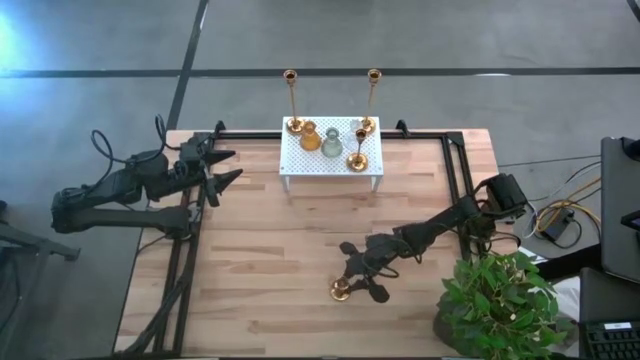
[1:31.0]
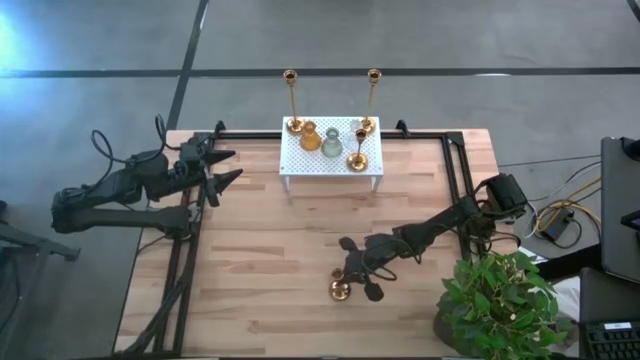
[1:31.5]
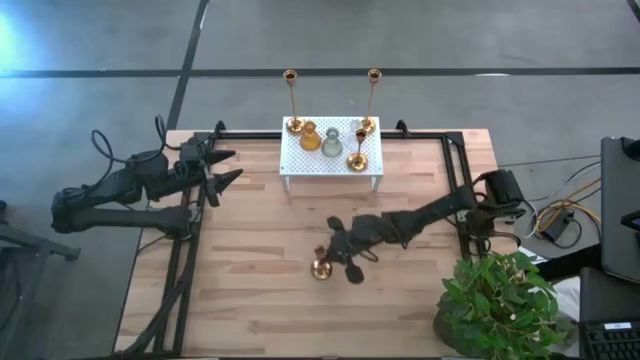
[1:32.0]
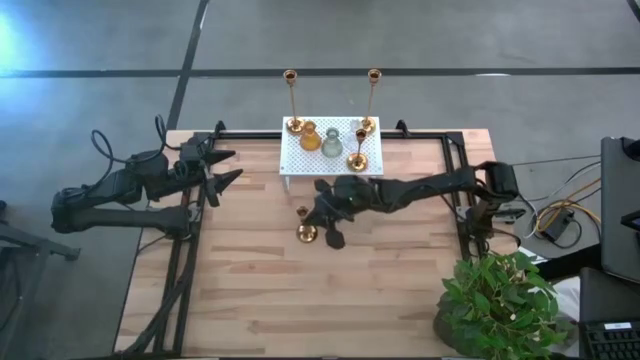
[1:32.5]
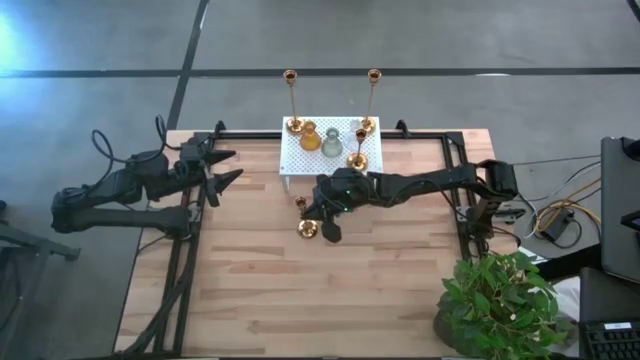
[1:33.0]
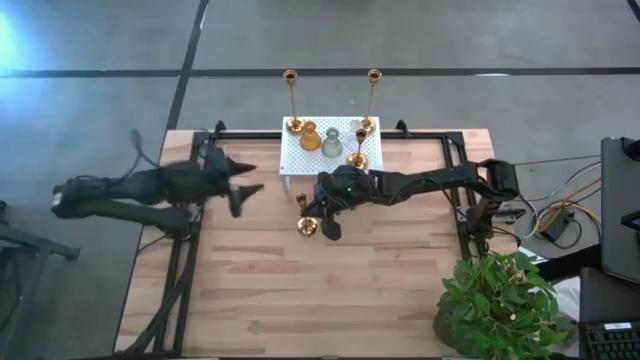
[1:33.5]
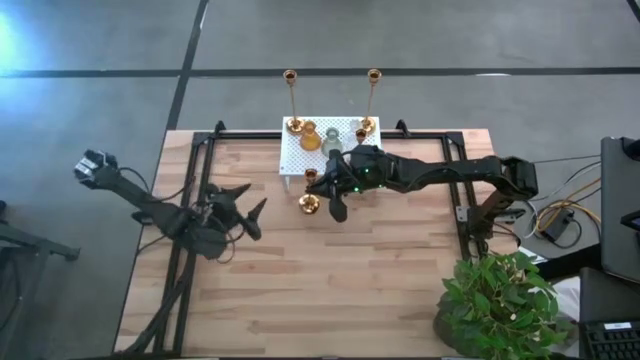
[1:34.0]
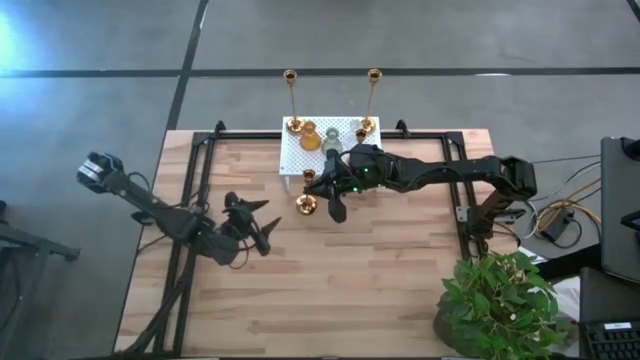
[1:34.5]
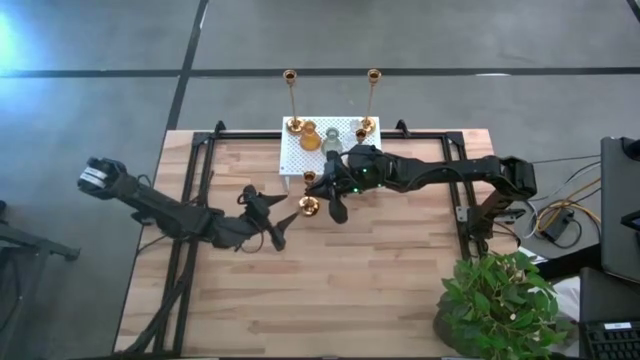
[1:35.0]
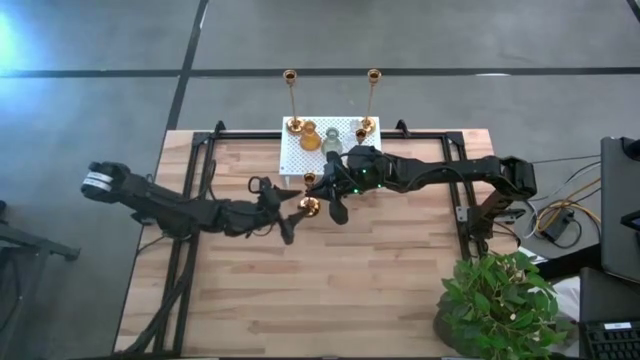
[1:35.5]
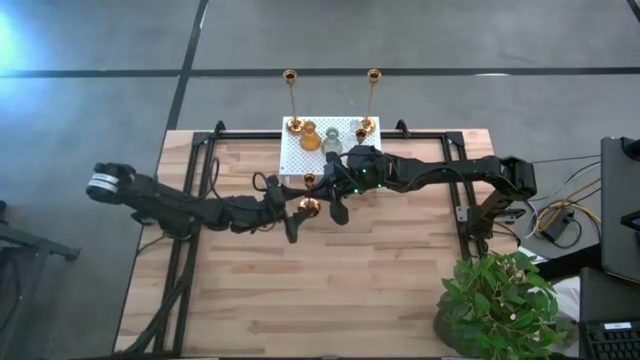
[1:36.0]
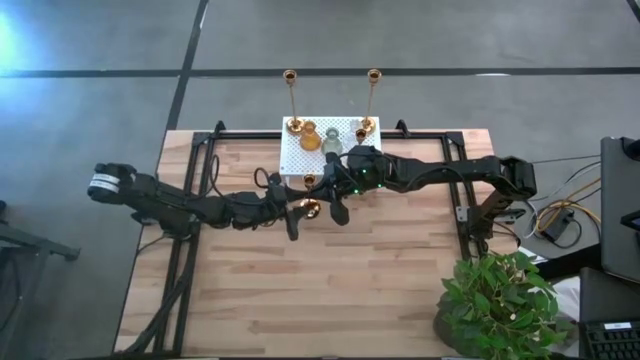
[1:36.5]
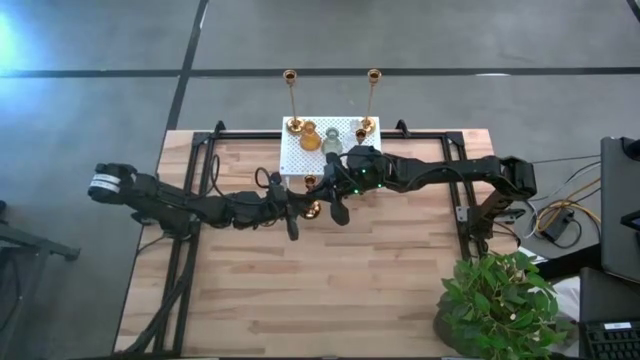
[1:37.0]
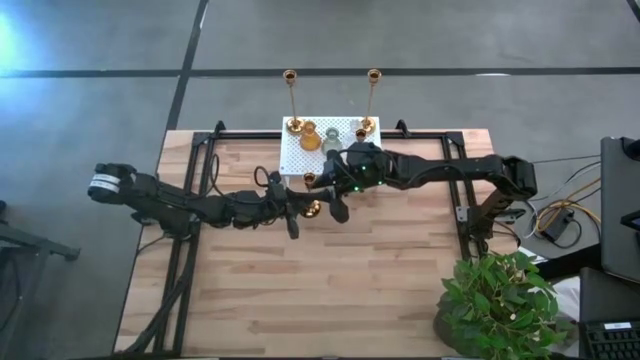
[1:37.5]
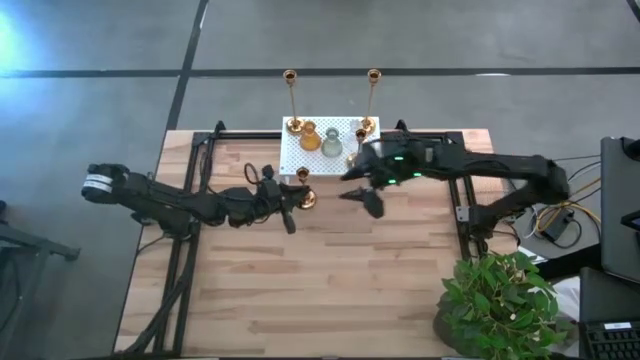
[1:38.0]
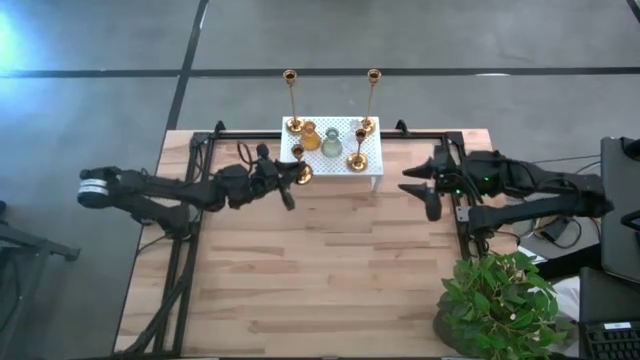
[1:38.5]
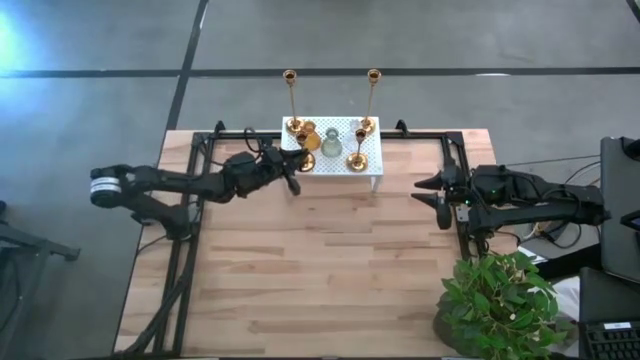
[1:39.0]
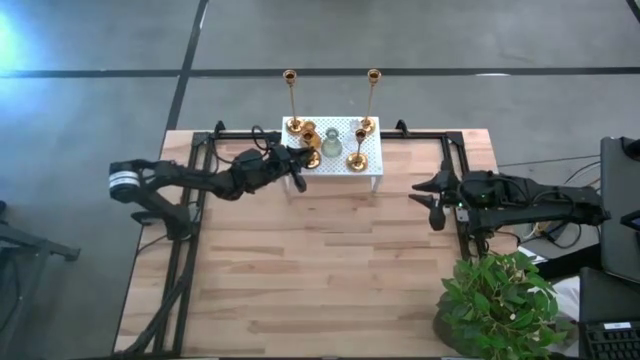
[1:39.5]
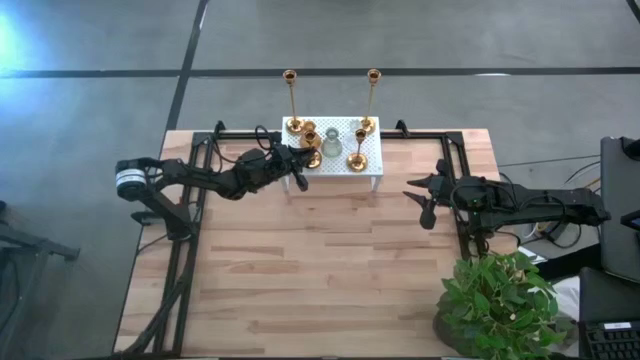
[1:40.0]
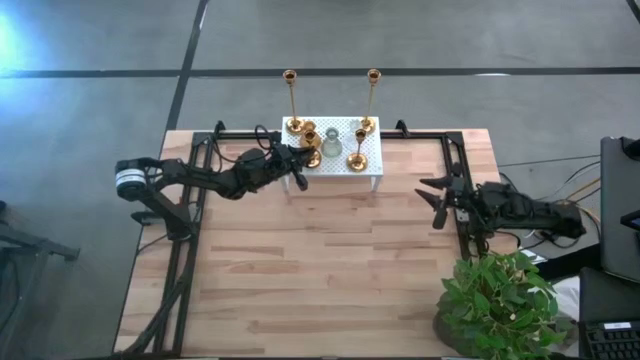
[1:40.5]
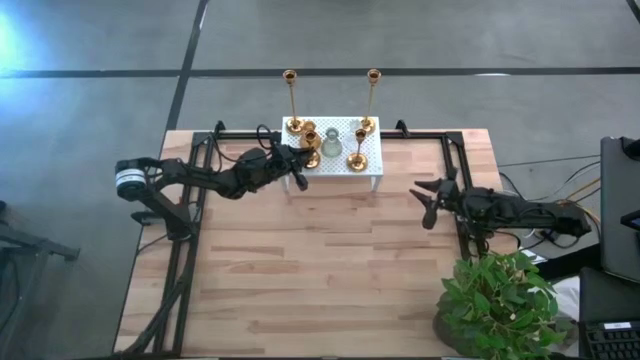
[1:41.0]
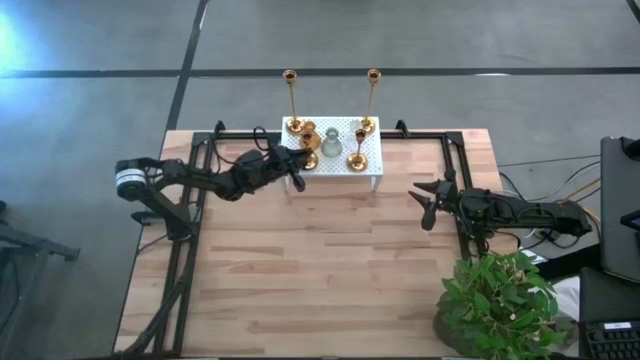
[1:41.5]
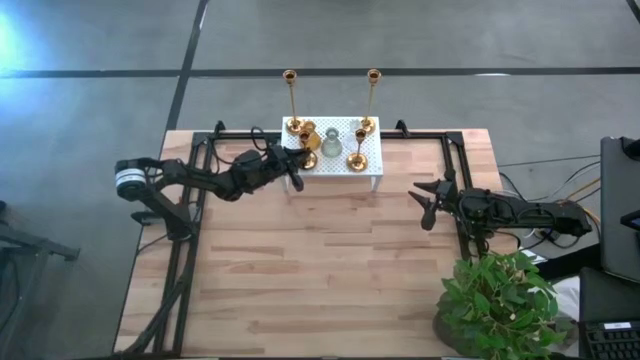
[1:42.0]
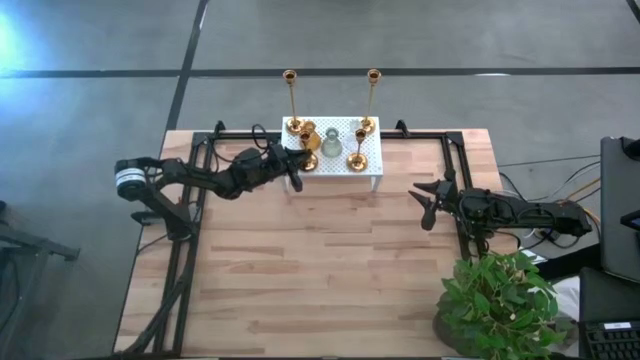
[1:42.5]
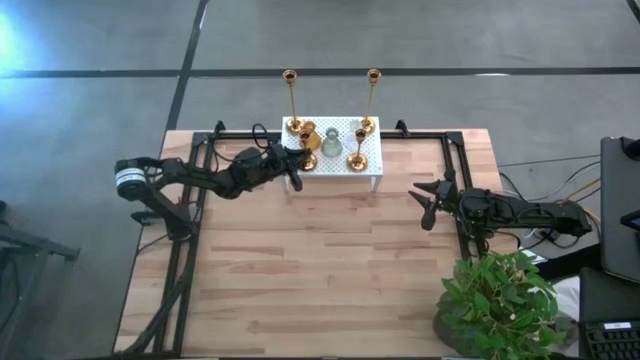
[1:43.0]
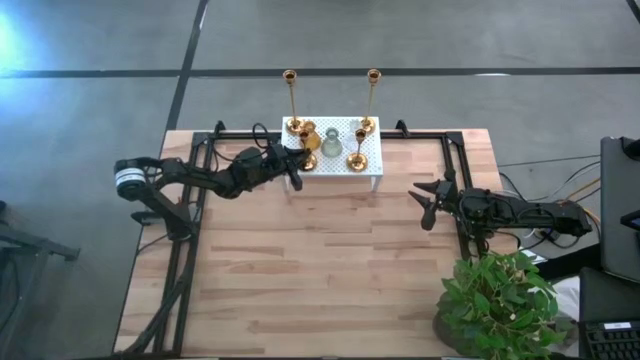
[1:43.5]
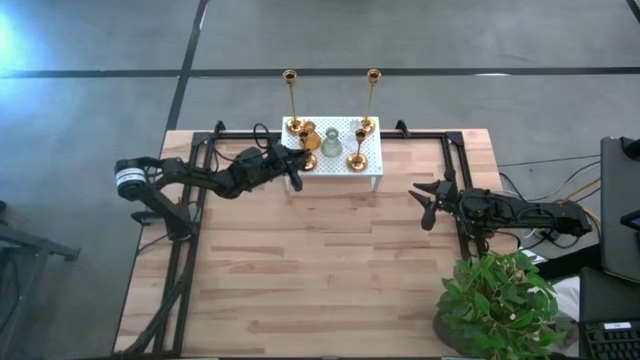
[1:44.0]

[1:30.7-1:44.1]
Task: Pick & Place candle stick holders
Put the golden candle holder on the shelf

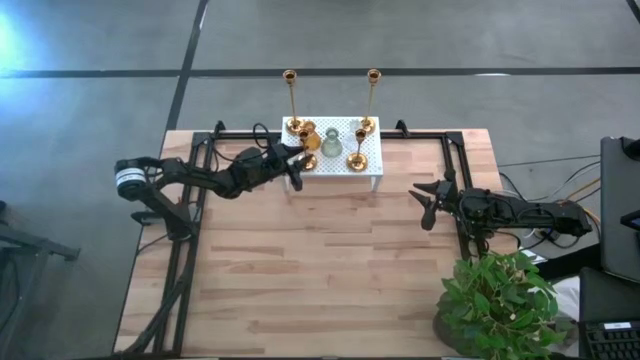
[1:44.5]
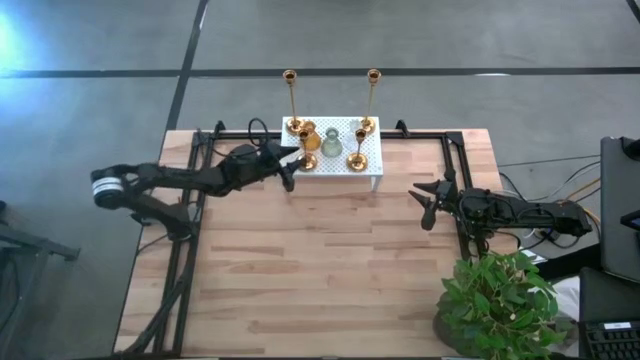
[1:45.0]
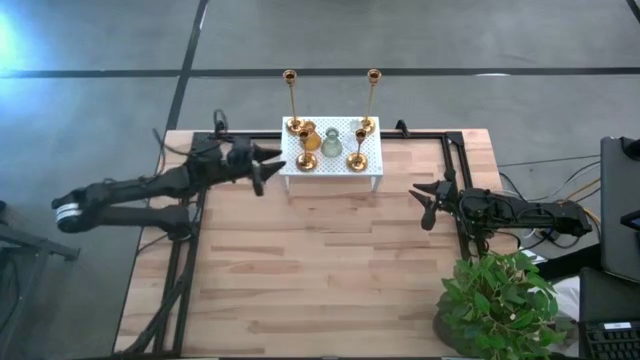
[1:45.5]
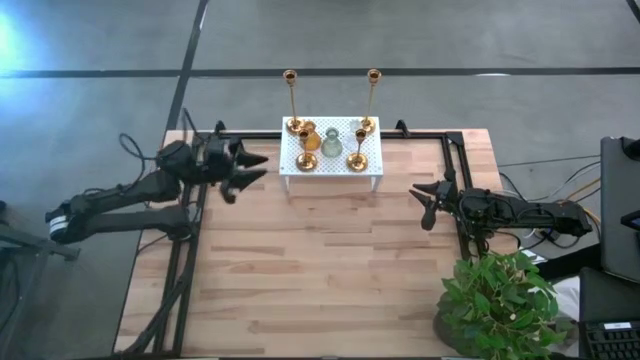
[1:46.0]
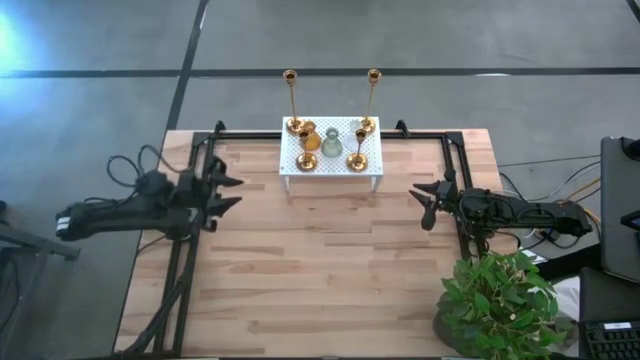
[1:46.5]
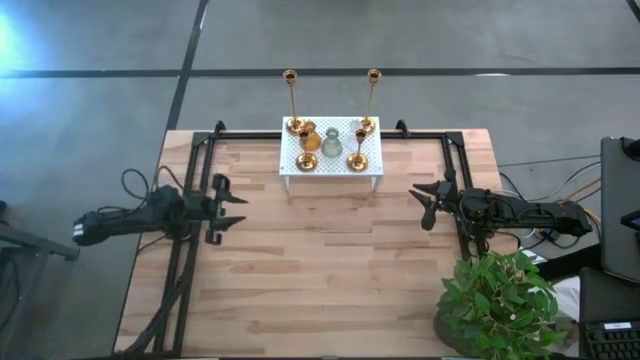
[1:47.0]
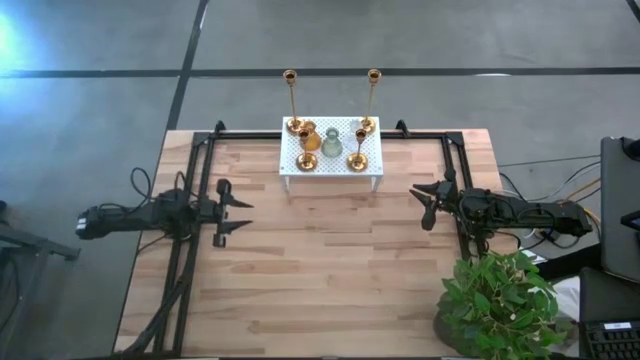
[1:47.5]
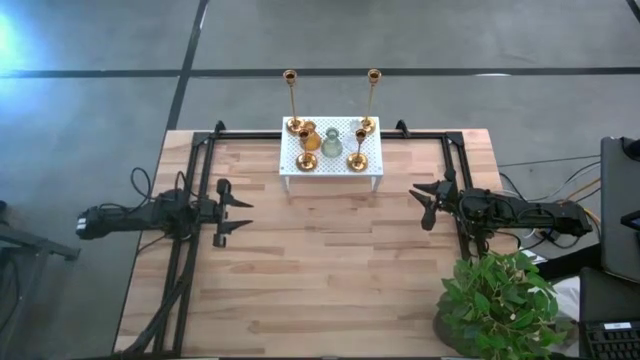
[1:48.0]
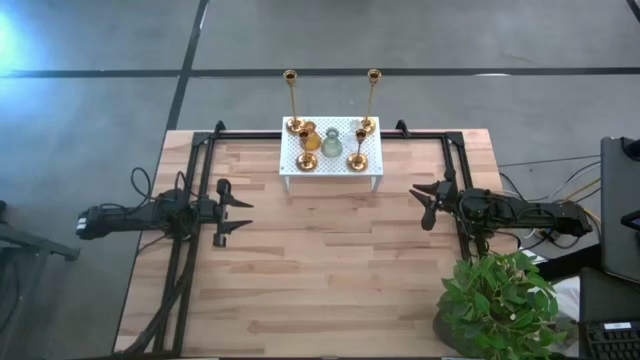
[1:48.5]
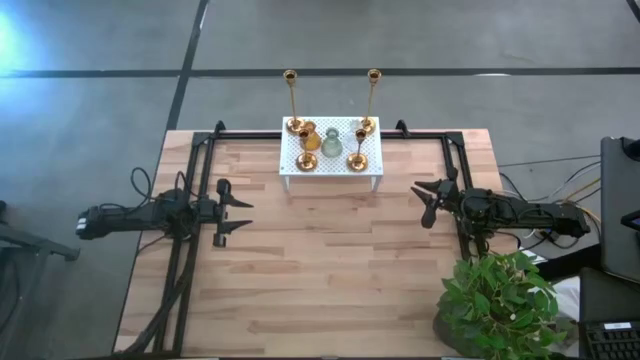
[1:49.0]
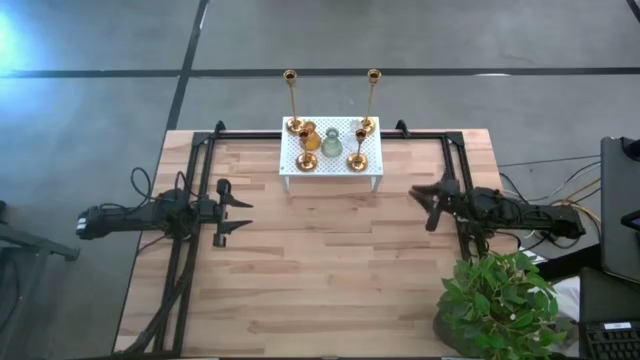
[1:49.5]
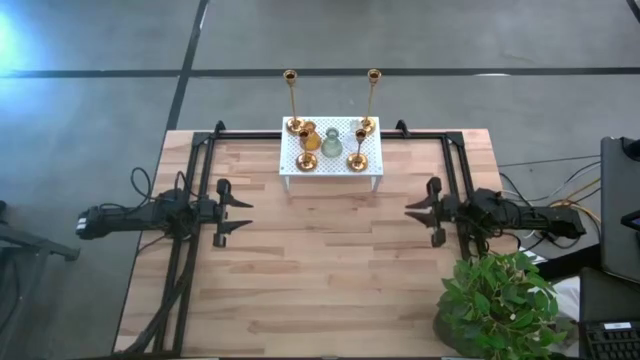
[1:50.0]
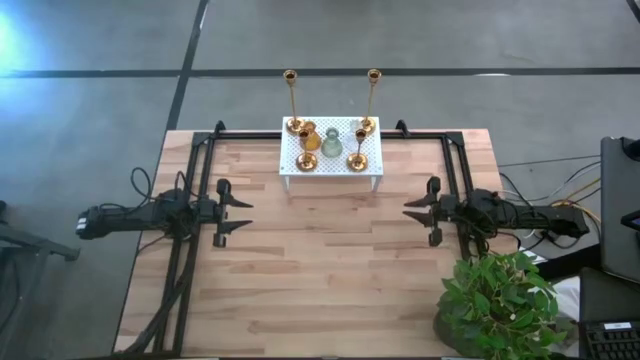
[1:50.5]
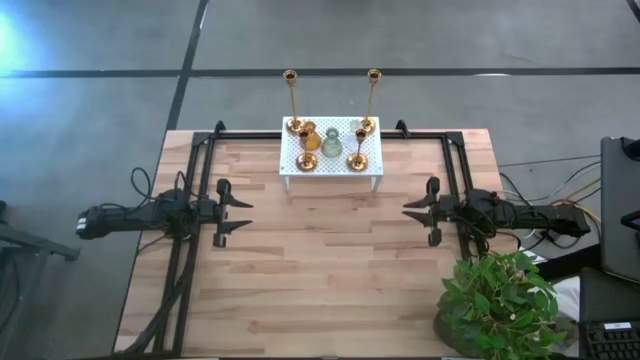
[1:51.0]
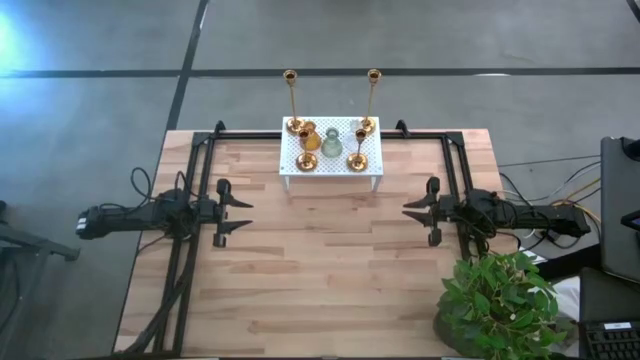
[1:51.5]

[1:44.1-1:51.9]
Return to Home Position
